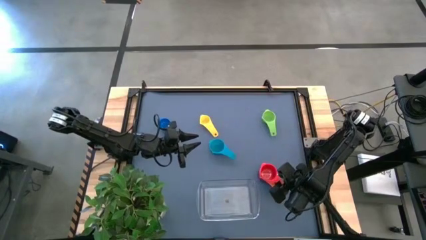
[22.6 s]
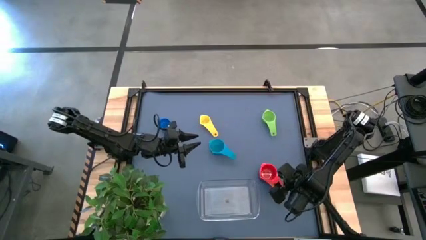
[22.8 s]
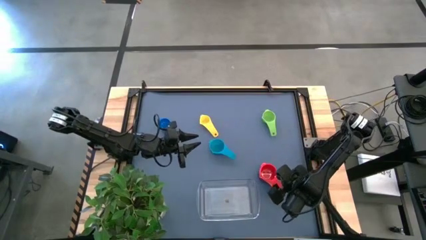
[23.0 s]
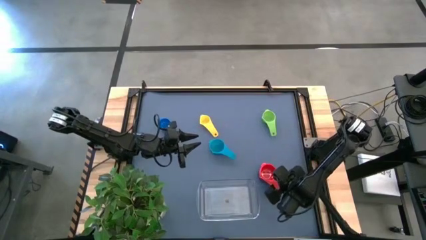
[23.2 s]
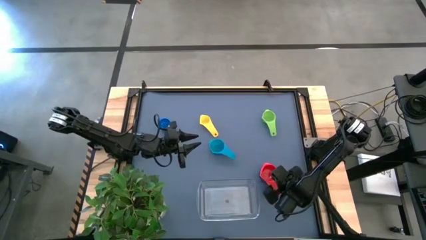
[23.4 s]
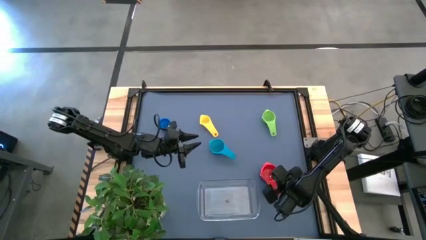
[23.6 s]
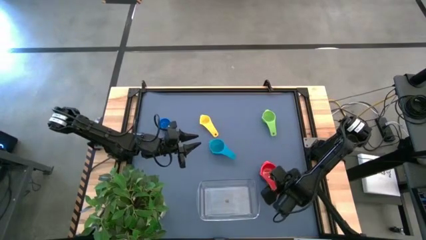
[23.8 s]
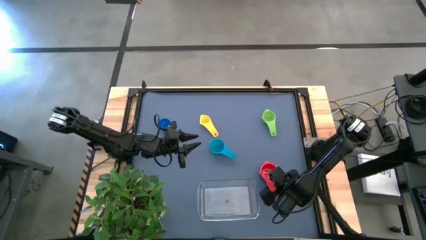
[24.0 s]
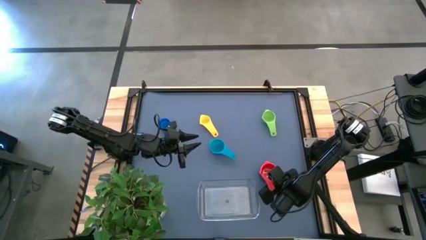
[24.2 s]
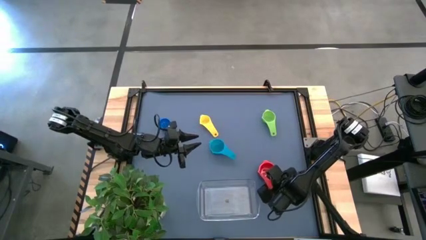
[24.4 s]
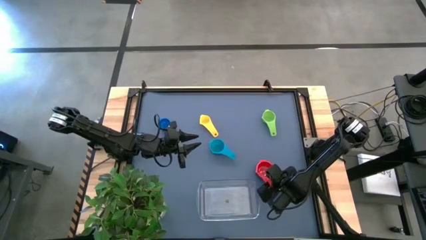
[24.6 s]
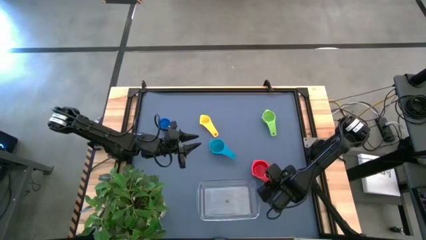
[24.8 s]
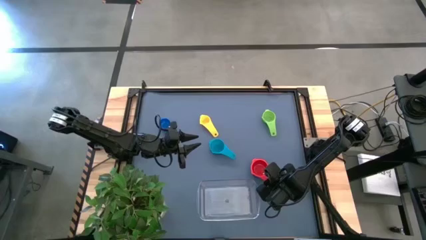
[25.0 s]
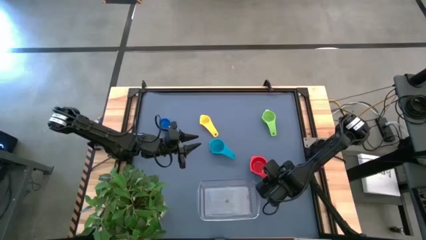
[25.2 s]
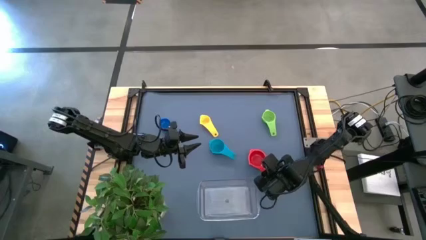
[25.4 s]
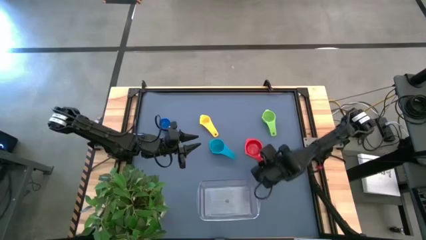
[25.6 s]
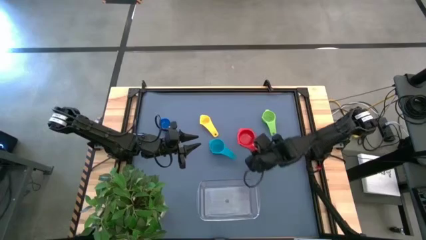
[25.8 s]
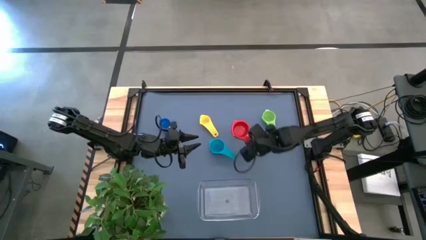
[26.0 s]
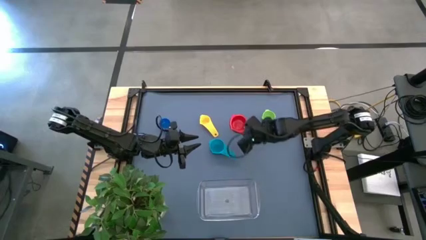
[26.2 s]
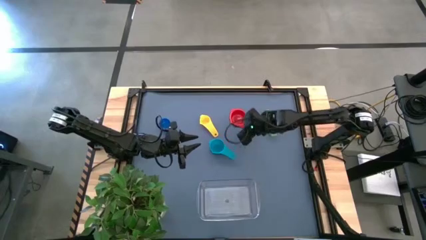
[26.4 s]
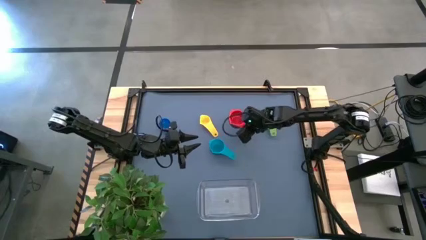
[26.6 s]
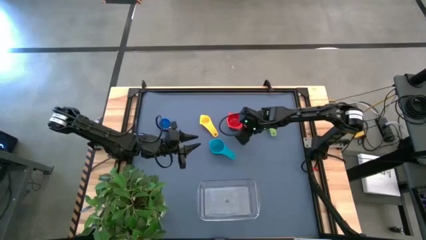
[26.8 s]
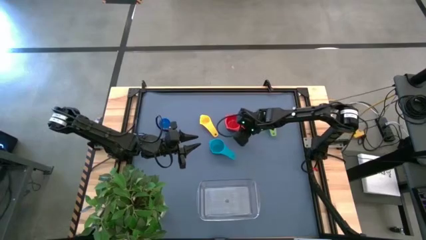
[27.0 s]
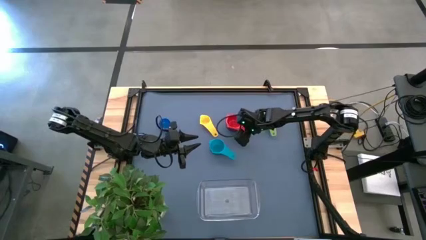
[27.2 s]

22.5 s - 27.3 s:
Task: Nest measuring cups in basket
Move the stacked measuring cup to the top center of the table

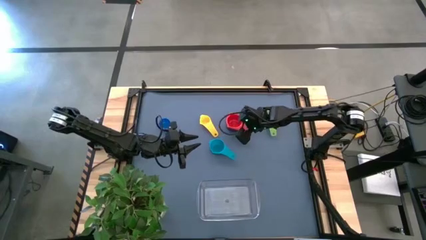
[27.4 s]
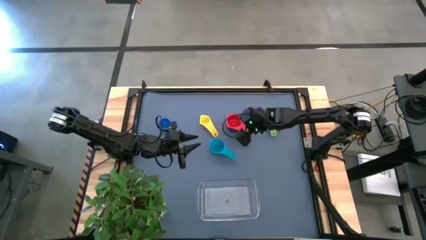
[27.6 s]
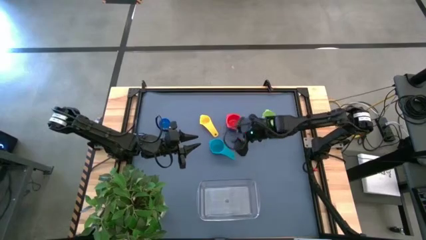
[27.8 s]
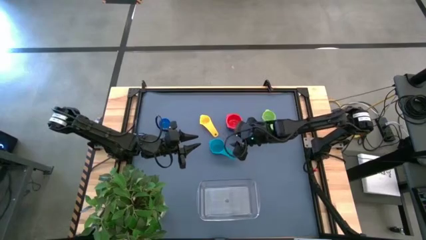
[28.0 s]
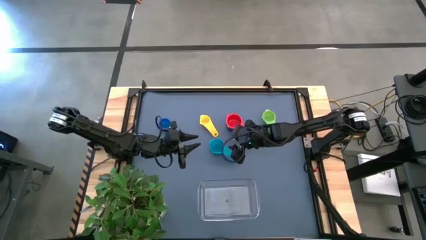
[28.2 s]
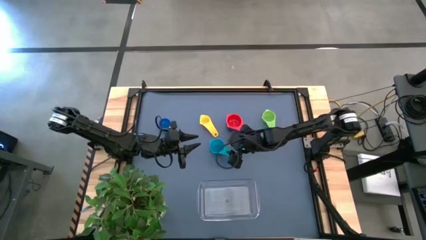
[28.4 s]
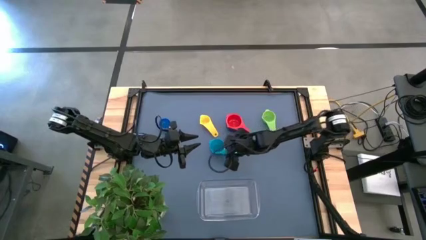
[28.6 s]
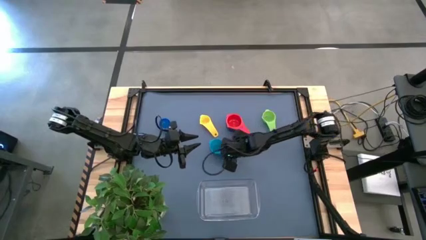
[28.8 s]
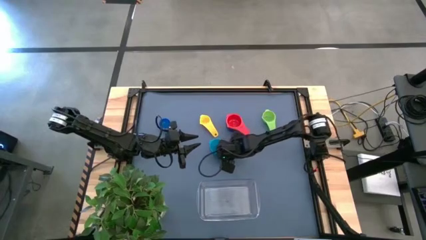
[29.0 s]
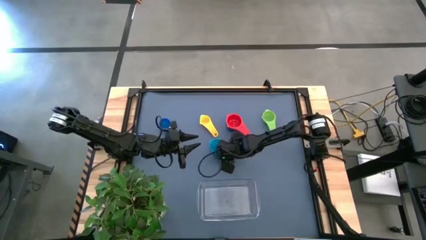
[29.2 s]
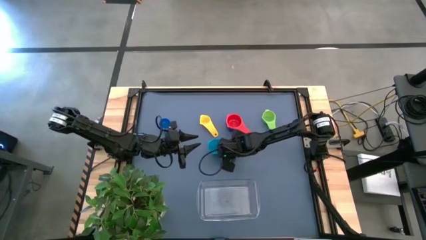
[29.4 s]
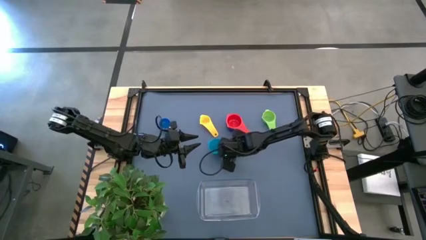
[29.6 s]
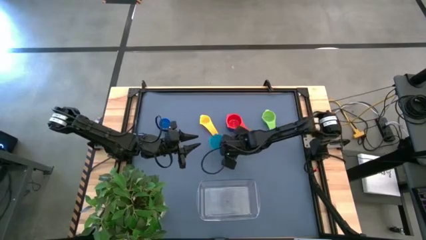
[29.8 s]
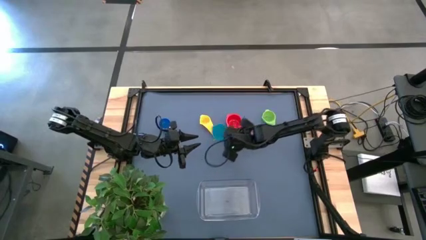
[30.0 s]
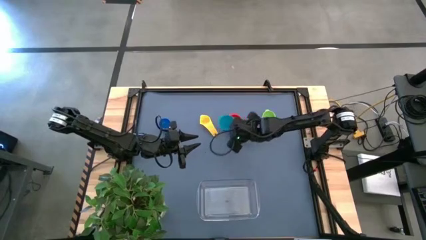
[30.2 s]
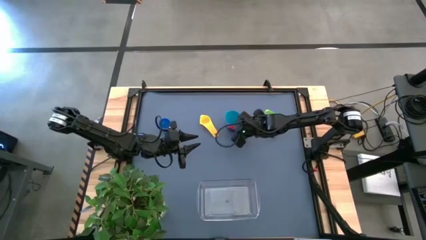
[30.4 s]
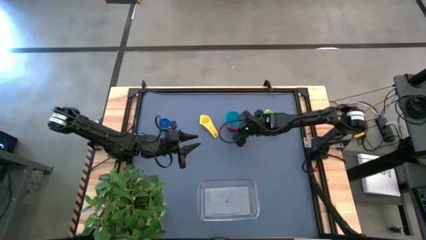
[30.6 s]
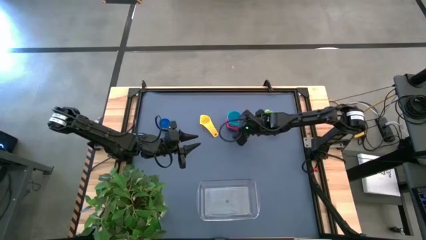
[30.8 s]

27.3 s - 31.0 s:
Stack the light blue measuring cup on top of the orange measuring cup

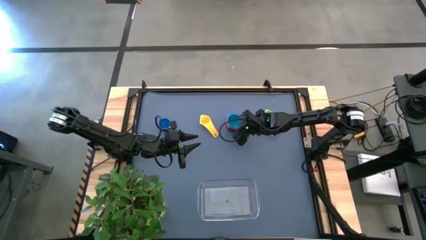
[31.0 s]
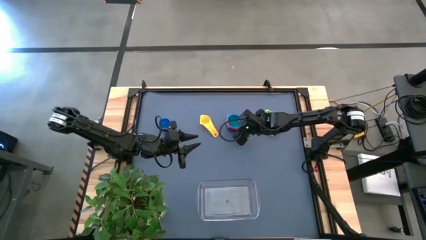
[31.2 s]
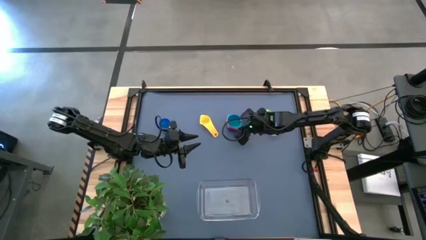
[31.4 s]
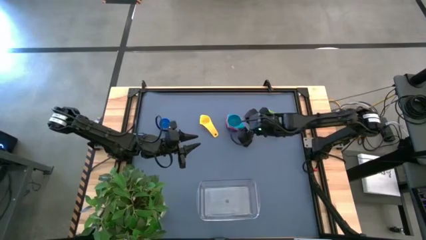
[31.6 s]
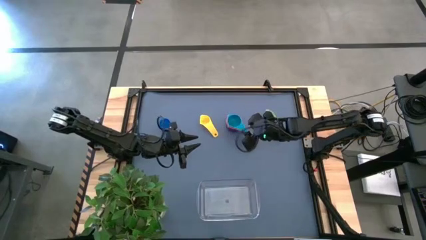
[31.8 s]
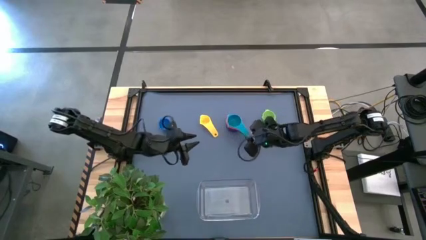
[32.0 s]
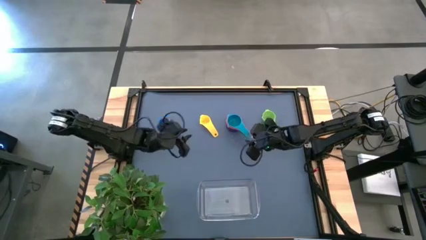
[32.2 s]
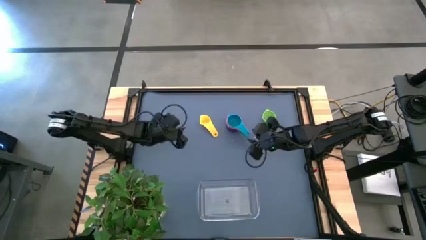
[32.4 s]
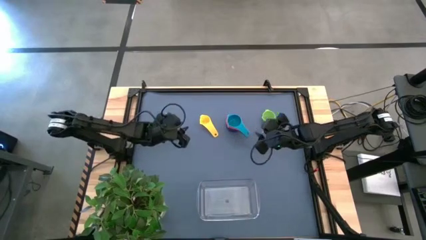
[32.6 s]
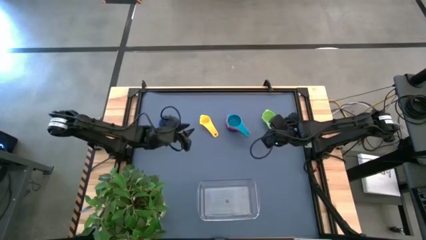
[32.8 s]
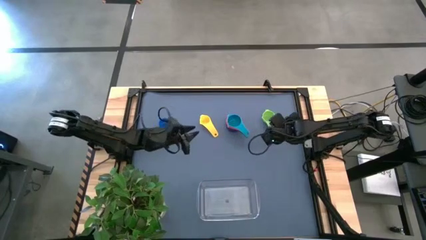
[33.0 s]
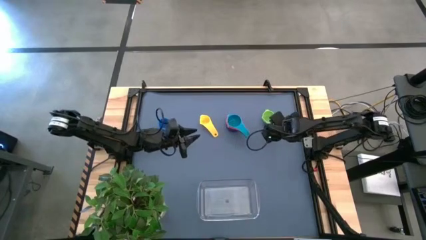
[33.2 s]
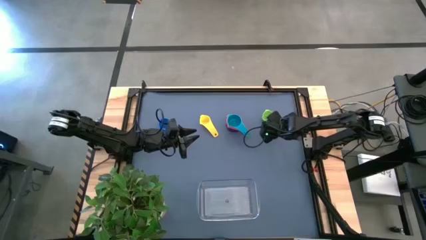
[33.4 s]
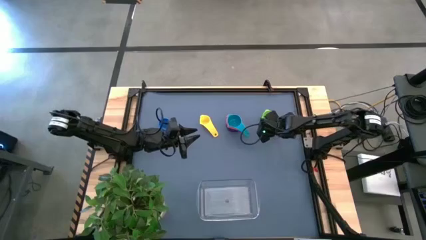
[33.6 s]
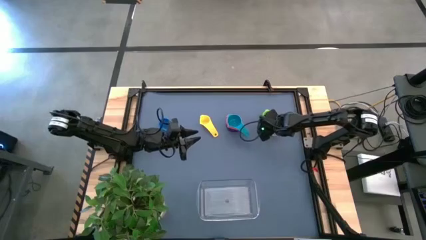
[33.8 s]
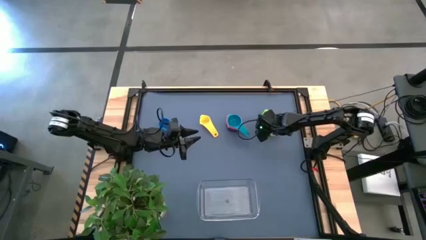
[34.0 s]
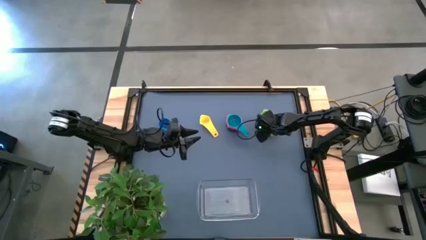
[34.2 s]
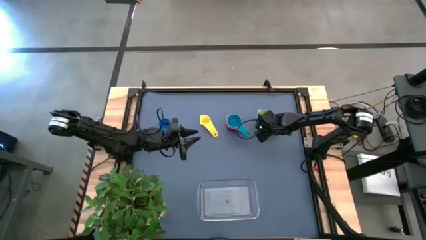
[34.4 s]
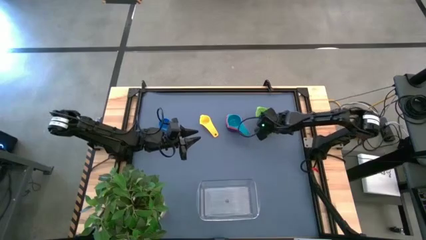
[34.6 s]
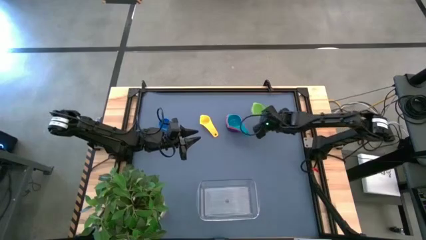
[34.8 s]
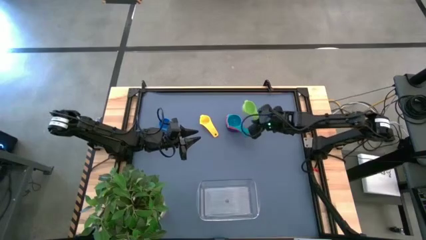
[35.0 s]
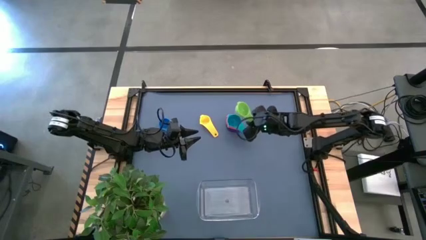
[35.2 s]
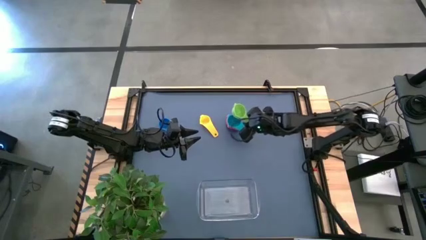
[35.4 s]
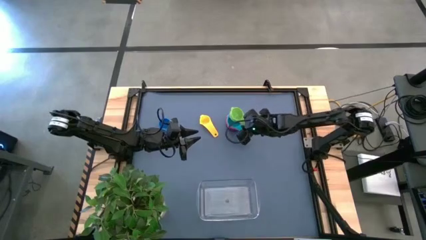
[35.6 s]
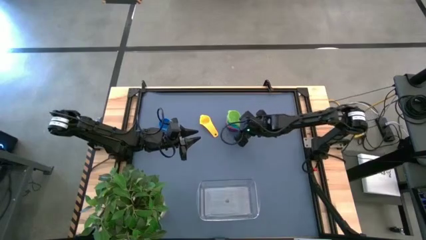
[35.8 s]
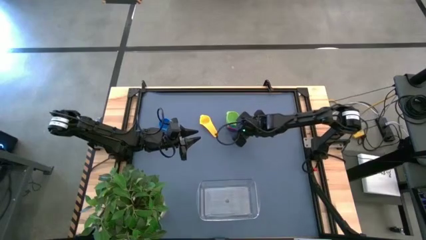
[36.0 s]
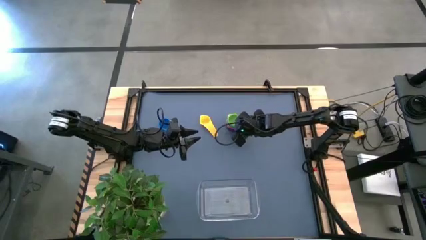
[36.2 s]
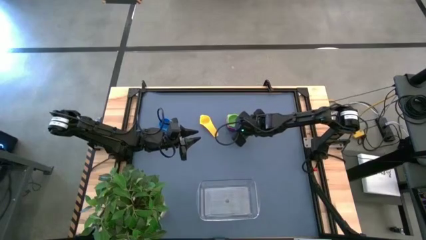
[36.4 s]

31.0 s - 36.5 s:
Stack the green measuring cup on top of the light blue measuring cup

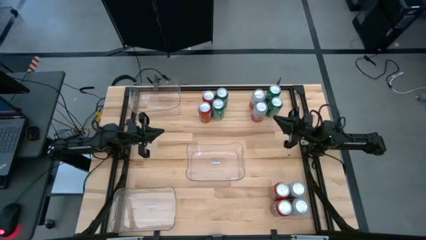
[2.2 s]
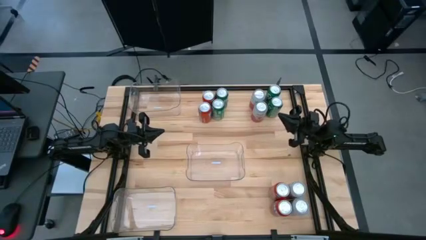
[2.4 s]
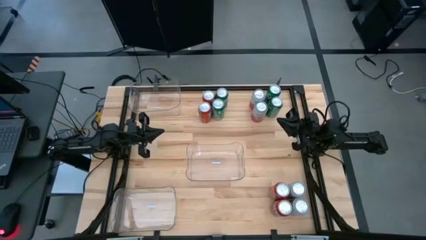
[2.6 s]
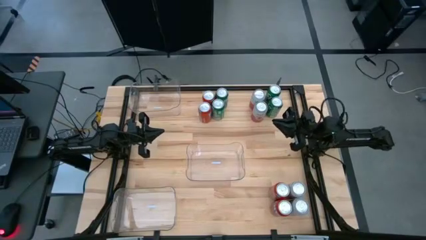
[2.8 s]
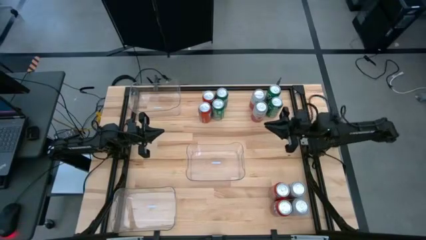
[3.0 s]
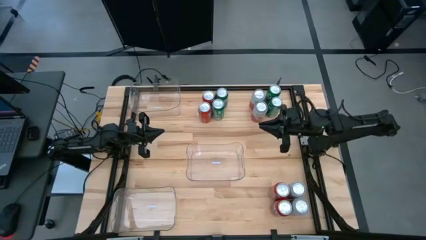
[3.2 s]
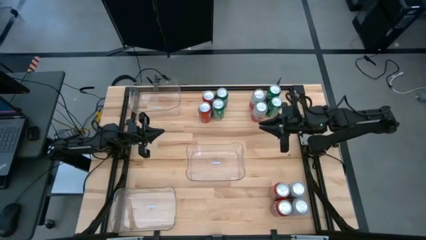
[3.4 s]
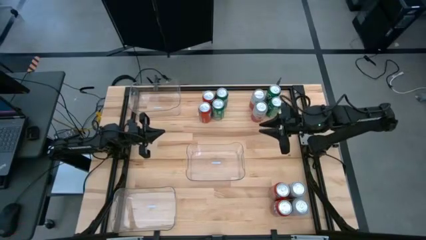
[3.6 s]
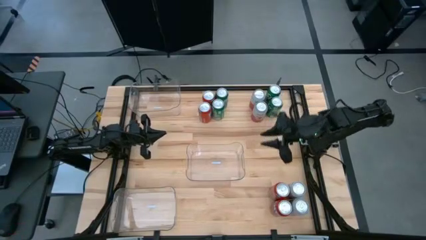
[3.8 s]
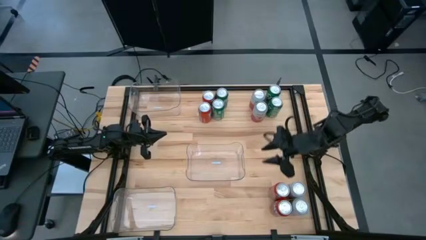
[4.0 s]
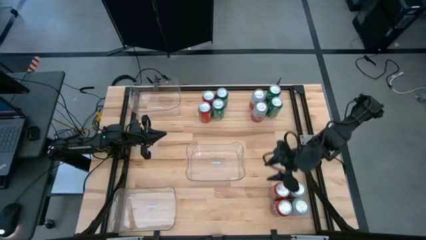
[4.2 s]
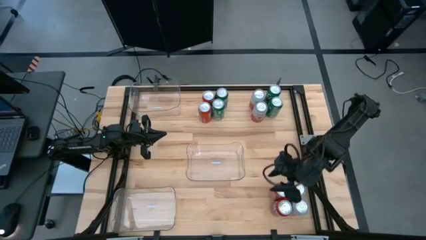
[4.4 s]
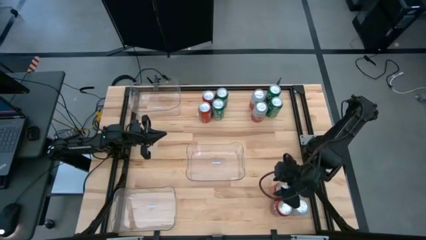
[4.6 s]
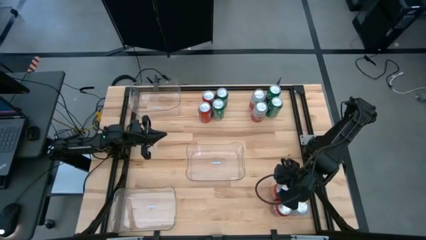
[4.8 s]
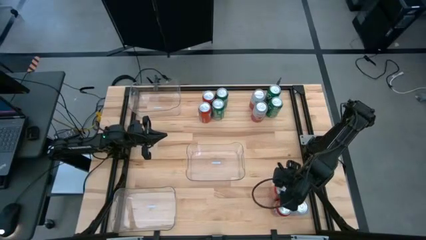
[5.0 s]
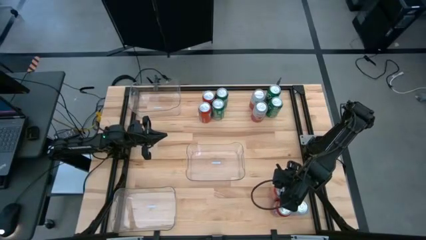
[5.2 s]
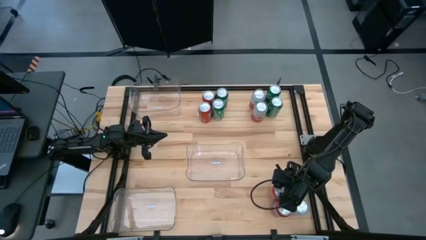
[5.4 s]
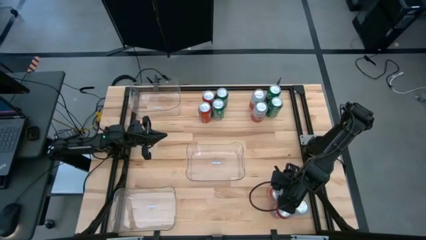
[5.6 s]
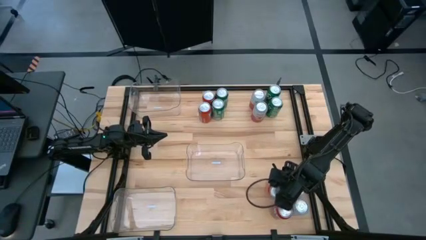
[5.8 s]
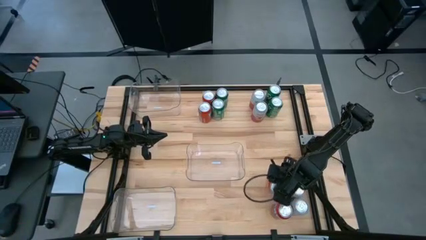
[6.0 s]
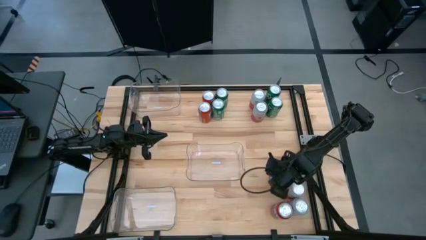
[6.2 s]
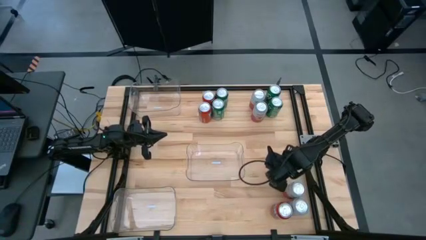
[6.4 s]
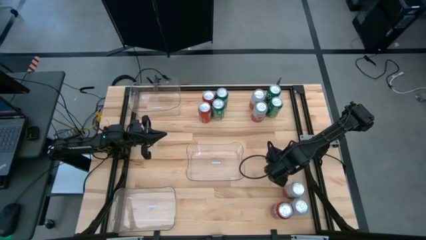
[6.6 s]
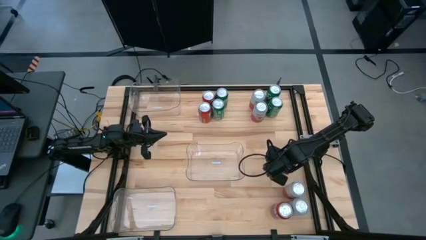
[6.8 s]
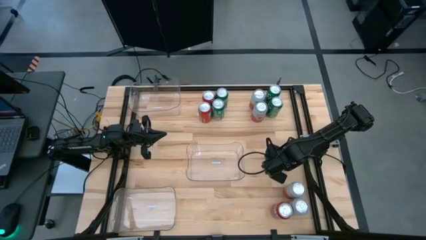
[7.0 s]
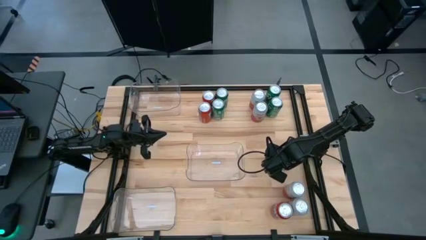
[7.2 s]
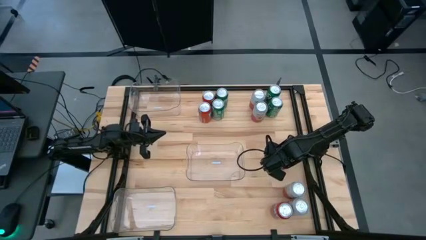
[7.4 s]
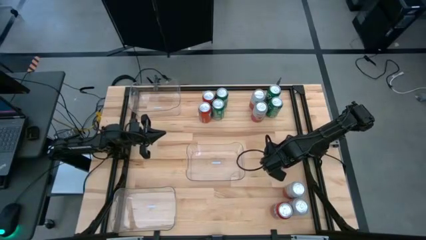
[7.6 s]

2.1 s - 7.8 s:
Task: Sort soda cans
Put the orange soda can into the middle transparent bin
